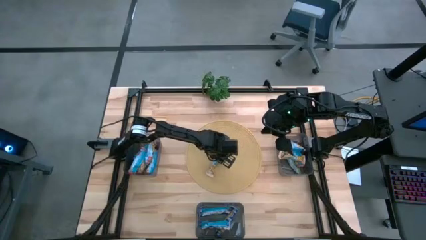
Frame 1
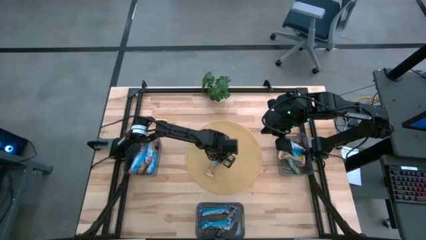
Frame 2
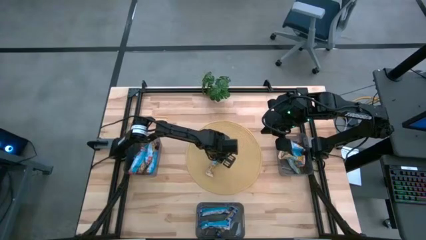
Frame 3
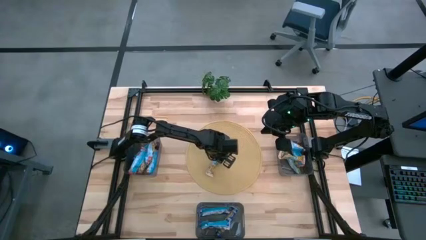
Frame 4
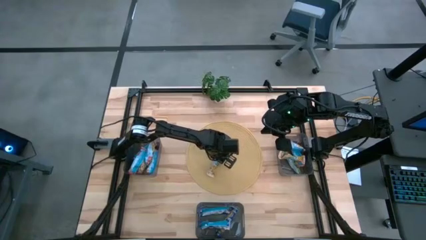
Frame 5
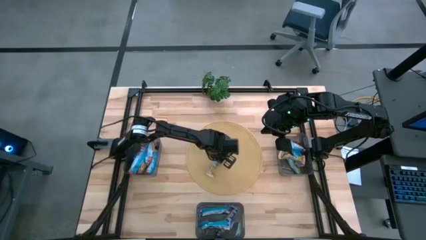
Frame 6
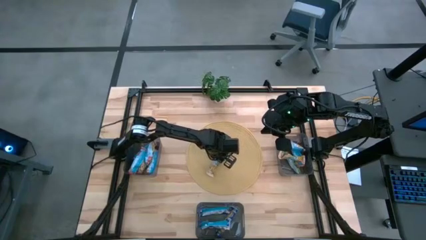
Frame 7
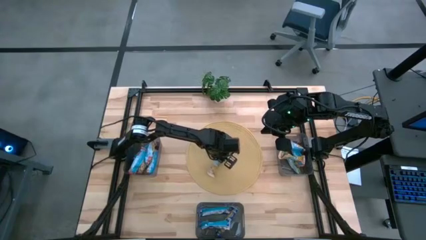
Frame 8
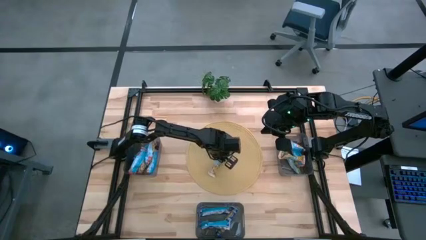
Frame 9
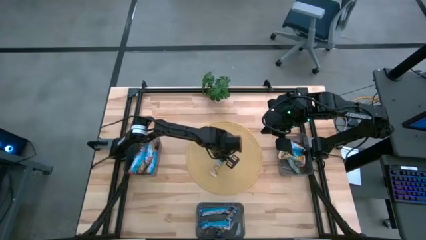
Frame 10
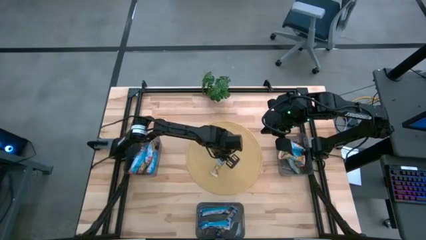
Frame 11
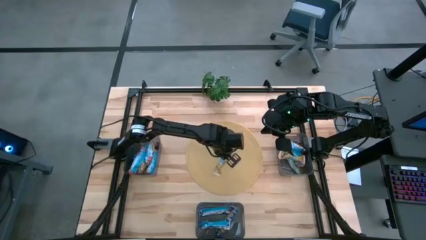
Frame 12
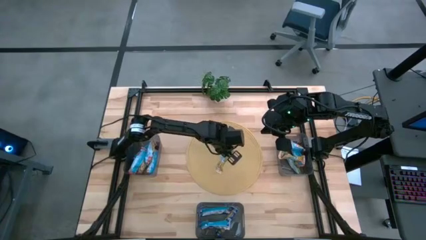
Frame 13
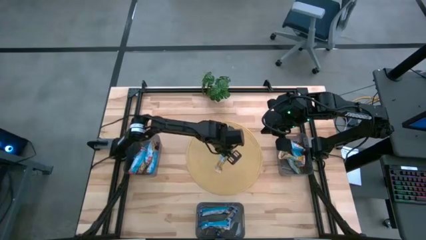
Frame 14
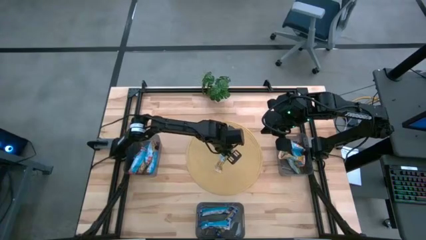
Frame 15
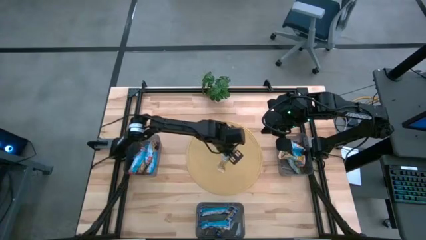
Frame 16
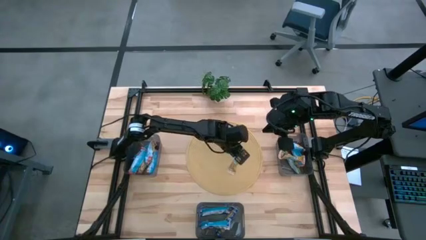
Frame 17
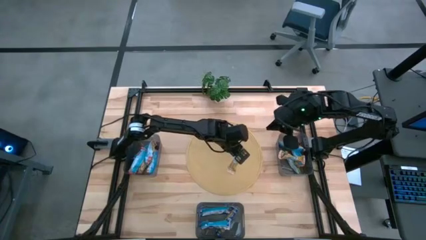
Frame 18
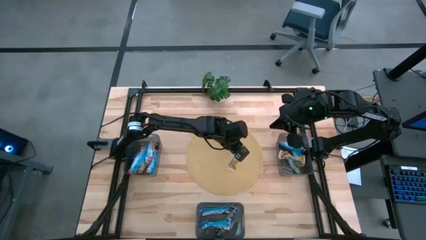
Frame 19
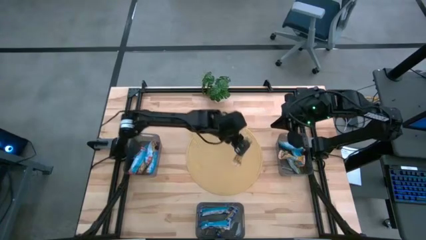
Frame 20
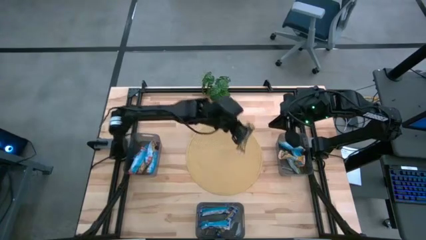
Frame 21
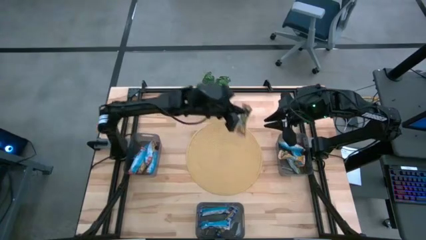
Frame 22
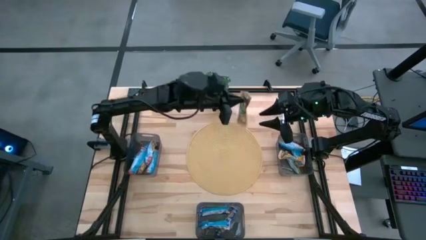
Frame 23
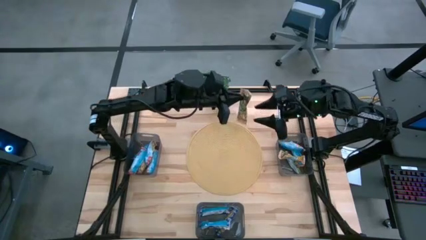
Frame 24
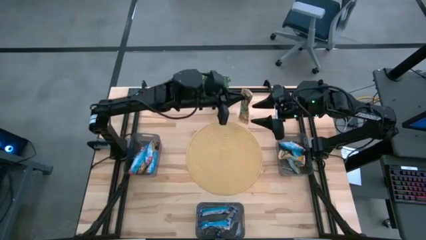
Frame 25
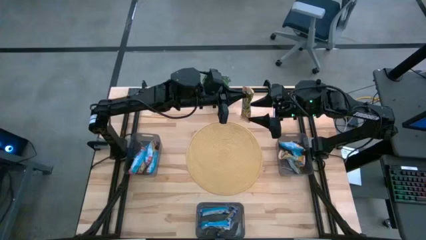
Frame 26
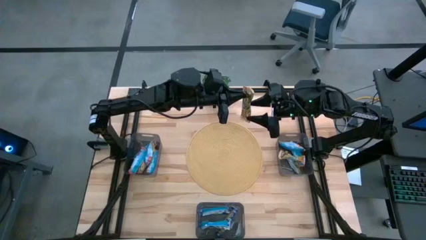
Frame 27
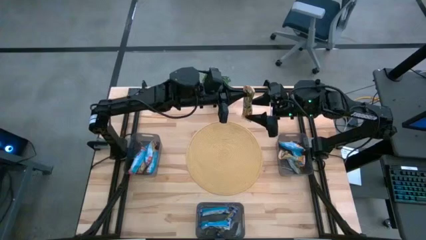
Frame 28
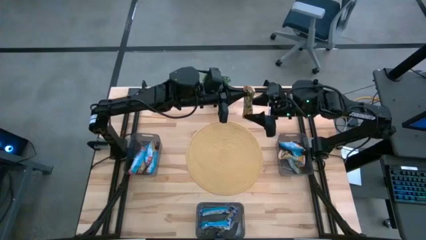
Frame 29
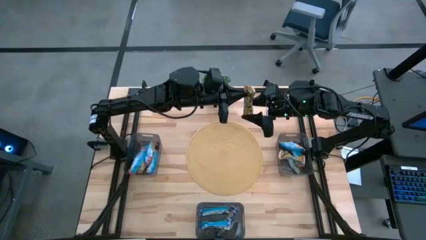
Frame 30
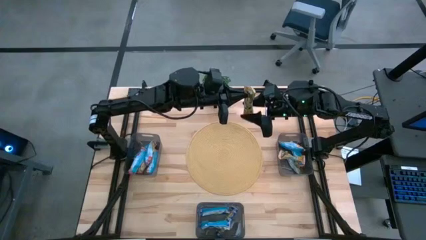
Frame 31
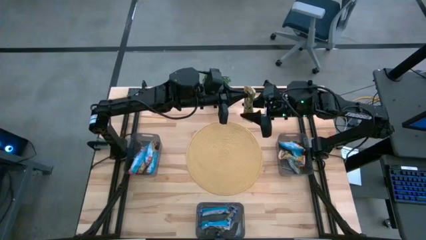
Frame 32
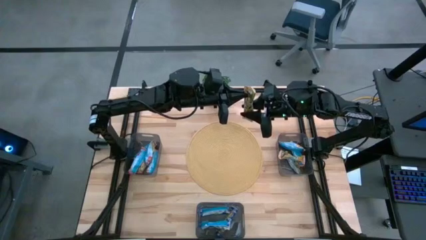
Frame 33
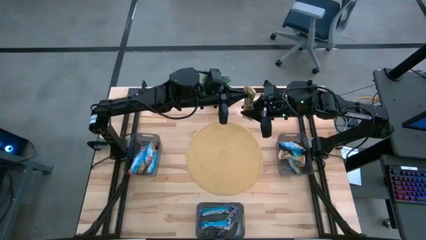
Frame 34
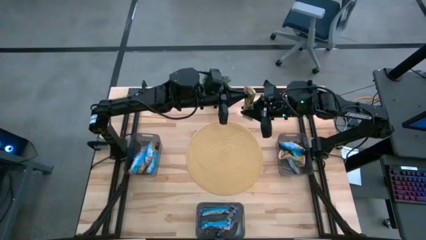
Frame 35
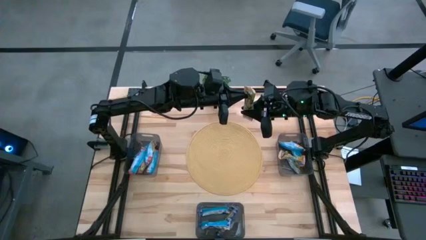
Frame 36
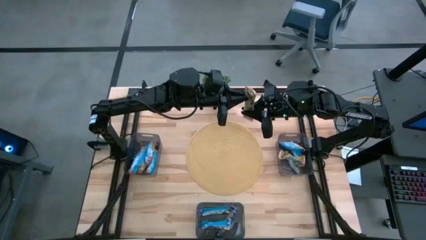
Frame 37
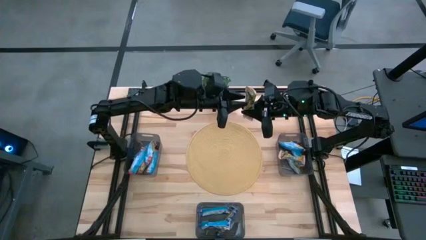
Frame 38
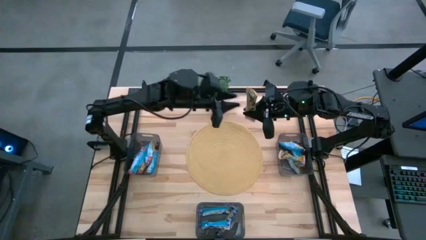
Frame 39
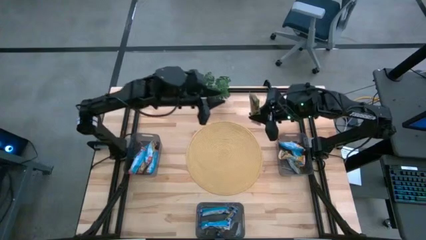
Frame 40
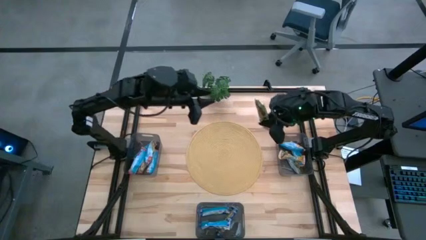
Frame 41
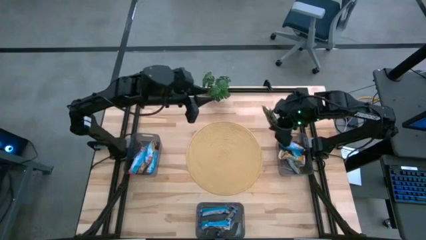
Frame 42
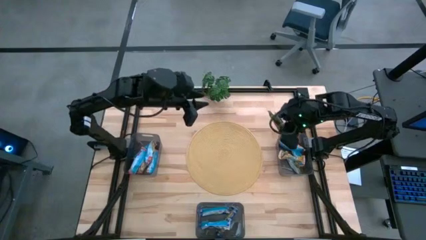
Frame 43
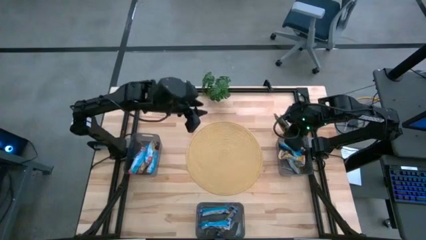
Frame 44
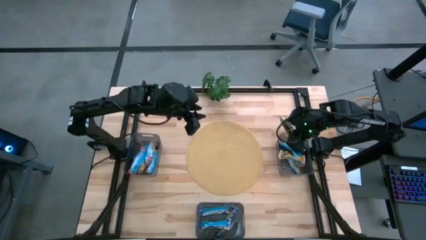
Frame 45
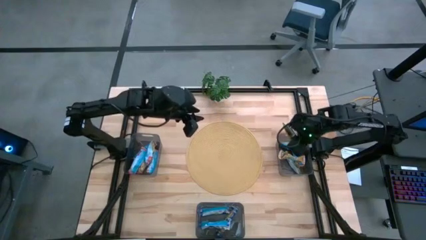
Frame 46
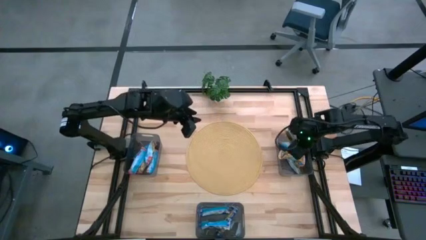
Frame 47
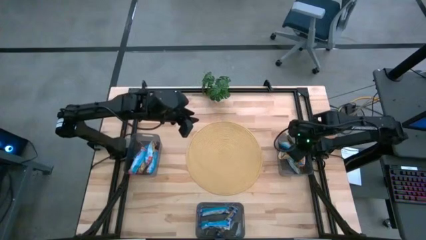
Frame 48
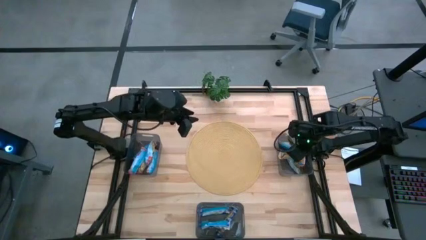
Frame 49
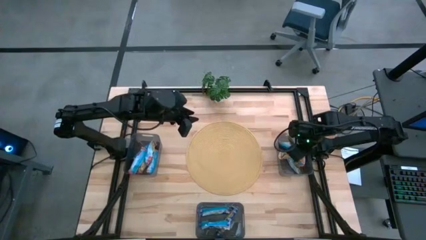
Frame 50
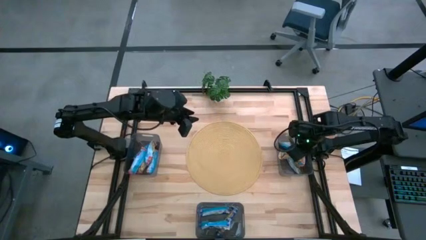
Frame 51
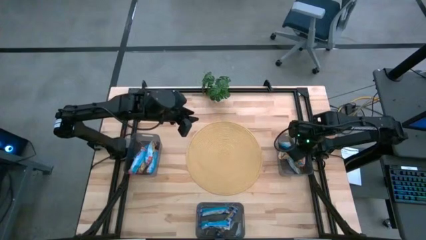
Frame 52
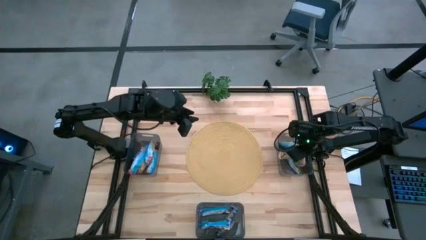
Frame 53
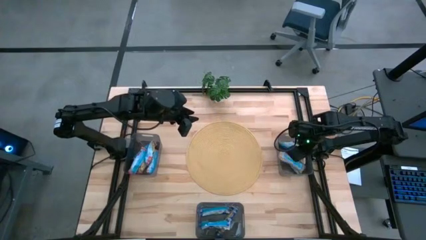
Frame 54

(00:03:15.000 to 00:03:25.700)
Task: Pick and place Granola Bars by type
Put the yellow granola bar into the top right bin
